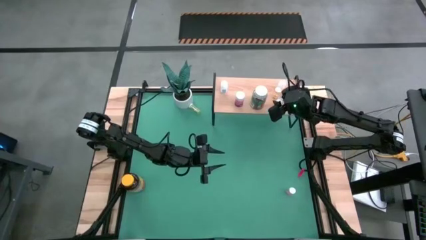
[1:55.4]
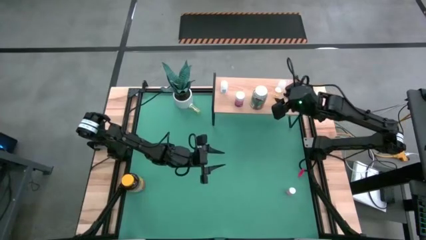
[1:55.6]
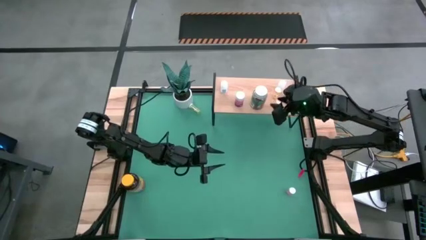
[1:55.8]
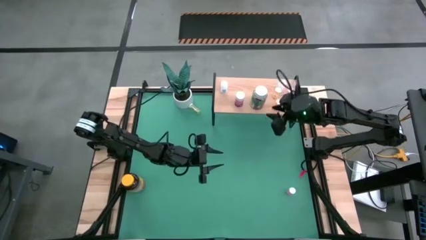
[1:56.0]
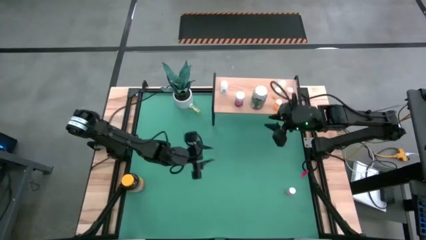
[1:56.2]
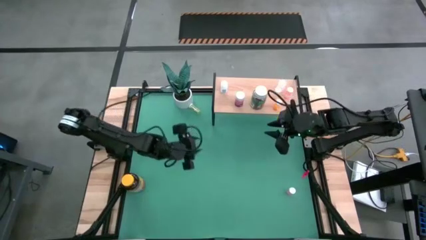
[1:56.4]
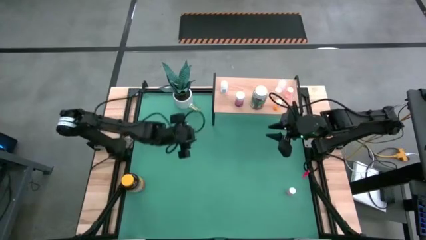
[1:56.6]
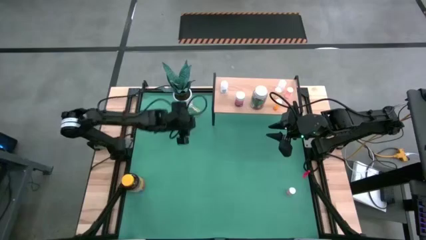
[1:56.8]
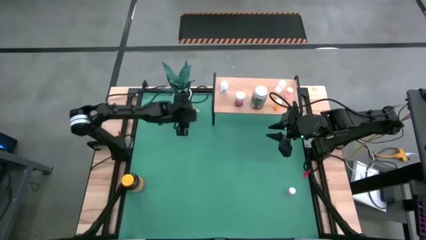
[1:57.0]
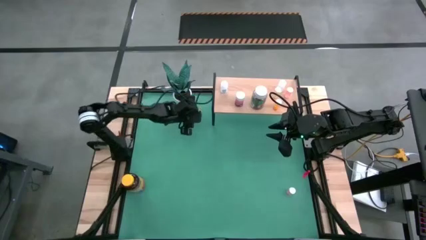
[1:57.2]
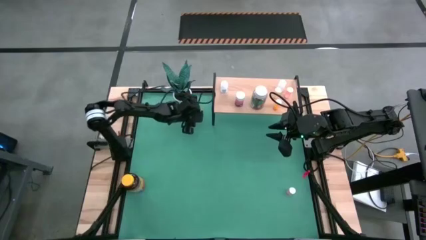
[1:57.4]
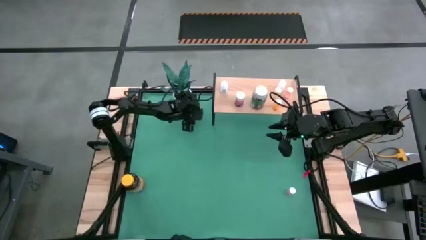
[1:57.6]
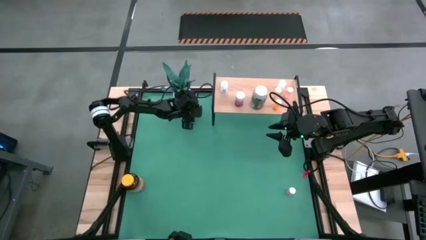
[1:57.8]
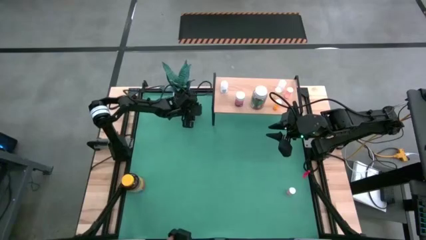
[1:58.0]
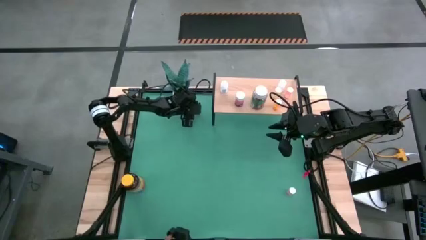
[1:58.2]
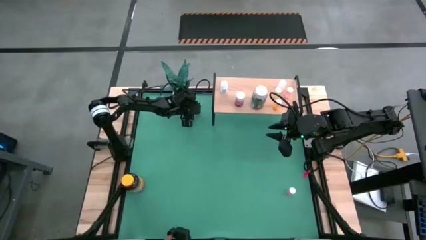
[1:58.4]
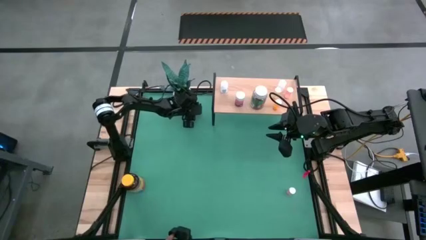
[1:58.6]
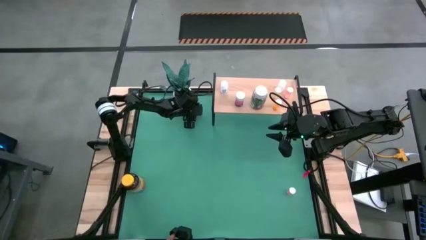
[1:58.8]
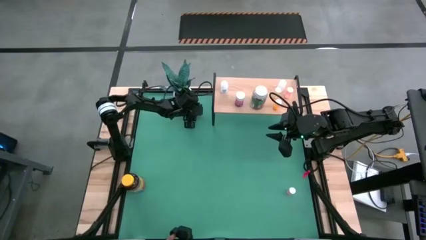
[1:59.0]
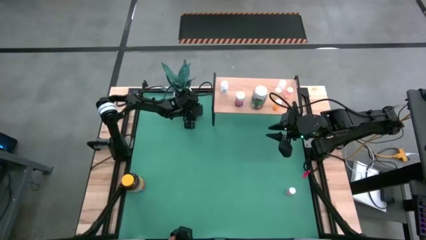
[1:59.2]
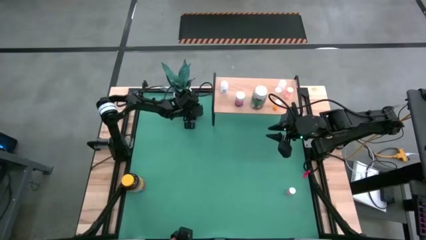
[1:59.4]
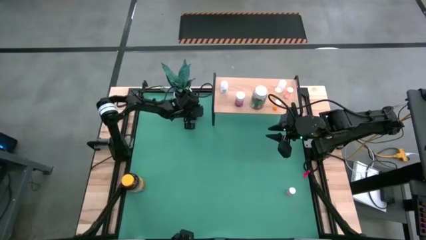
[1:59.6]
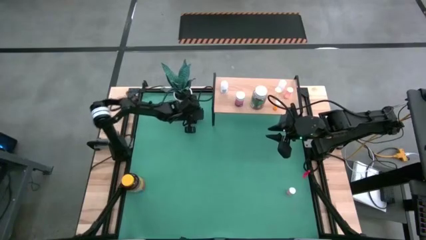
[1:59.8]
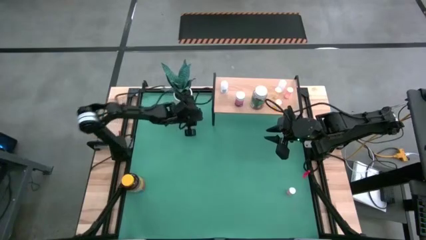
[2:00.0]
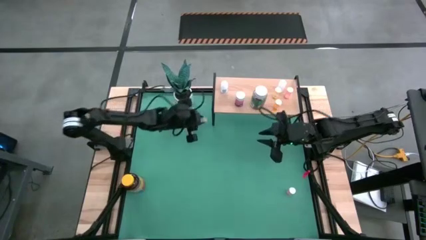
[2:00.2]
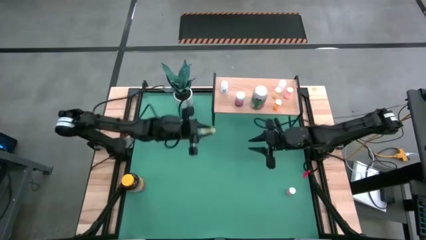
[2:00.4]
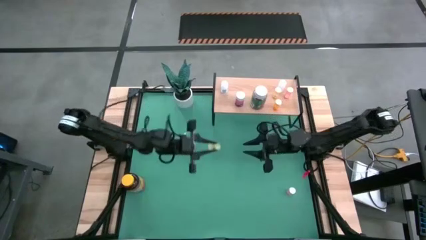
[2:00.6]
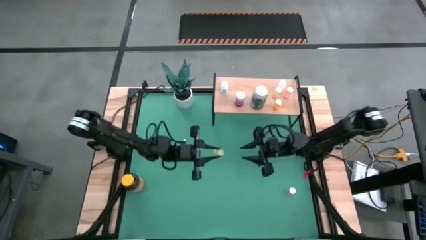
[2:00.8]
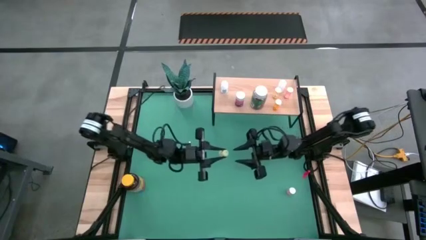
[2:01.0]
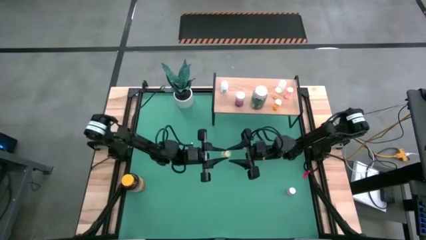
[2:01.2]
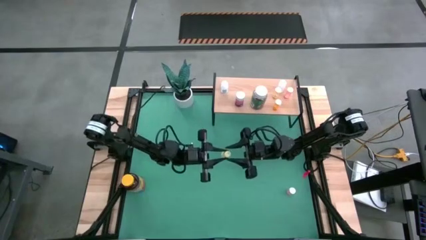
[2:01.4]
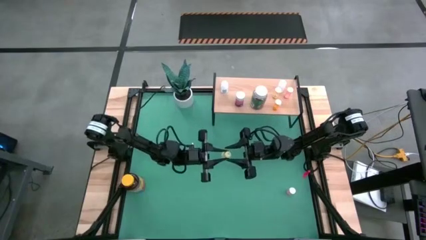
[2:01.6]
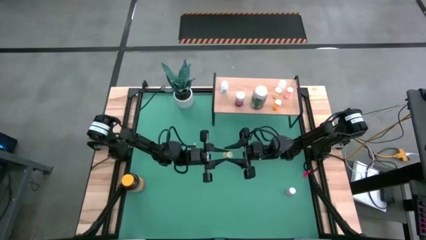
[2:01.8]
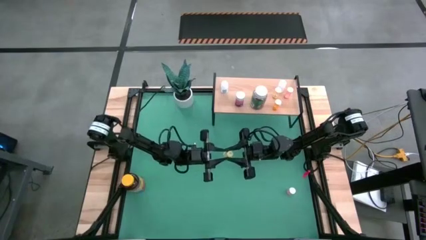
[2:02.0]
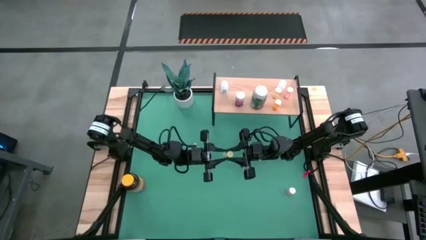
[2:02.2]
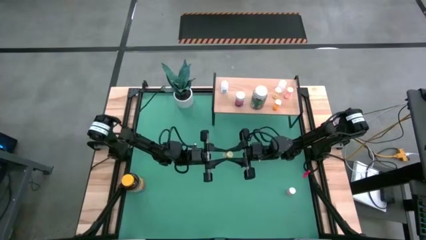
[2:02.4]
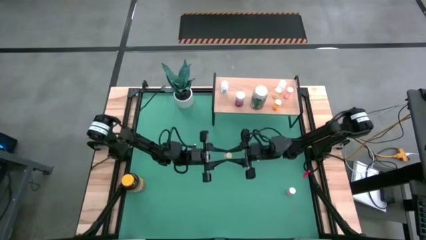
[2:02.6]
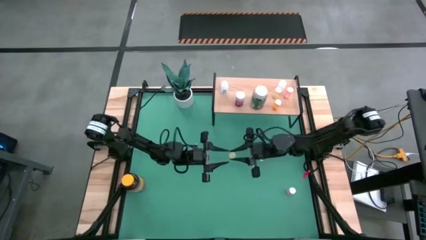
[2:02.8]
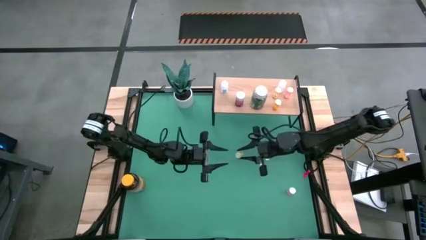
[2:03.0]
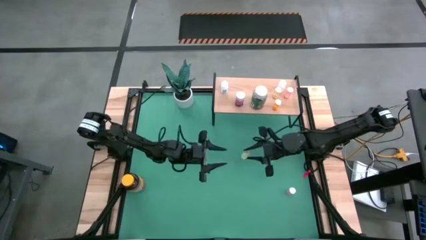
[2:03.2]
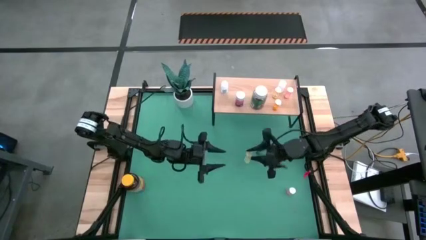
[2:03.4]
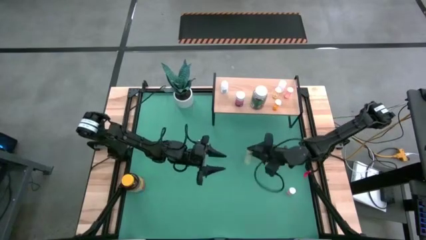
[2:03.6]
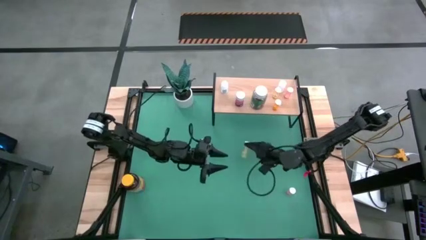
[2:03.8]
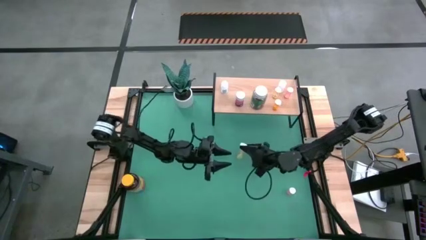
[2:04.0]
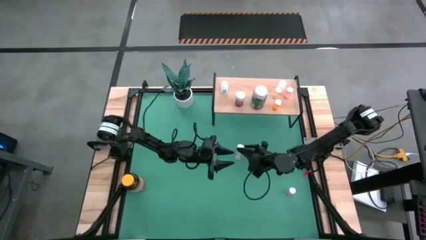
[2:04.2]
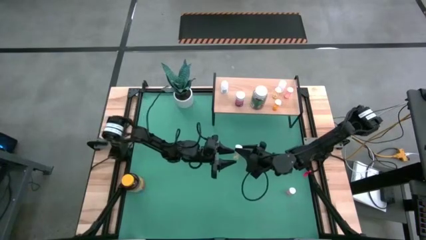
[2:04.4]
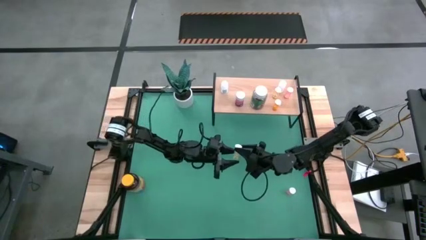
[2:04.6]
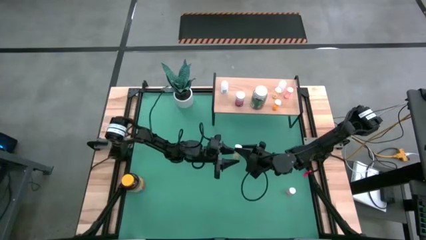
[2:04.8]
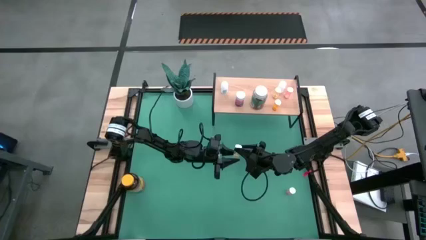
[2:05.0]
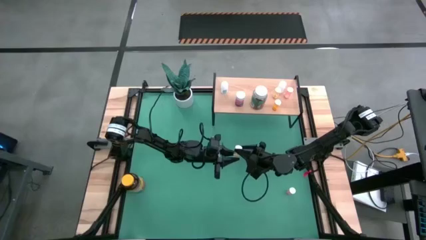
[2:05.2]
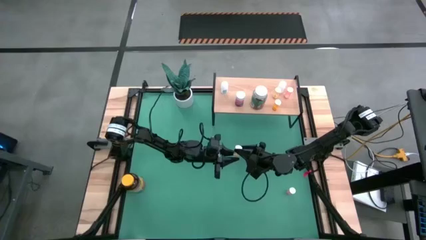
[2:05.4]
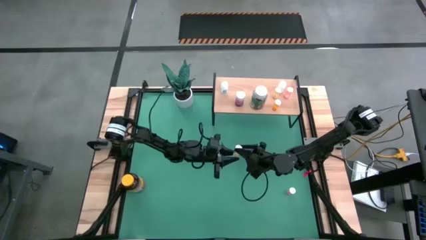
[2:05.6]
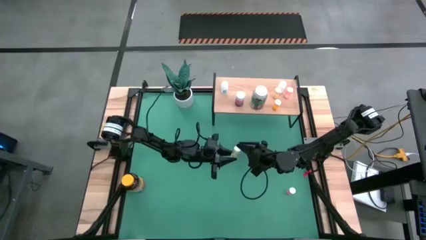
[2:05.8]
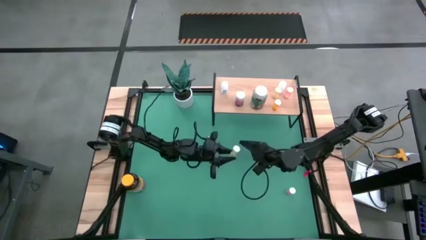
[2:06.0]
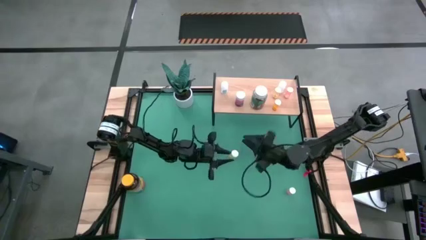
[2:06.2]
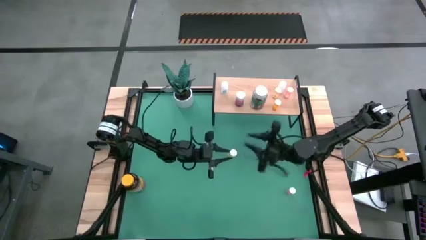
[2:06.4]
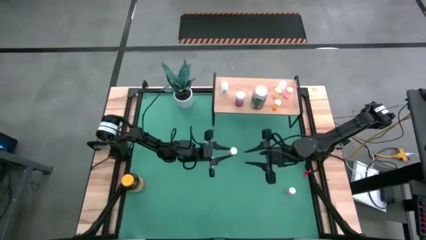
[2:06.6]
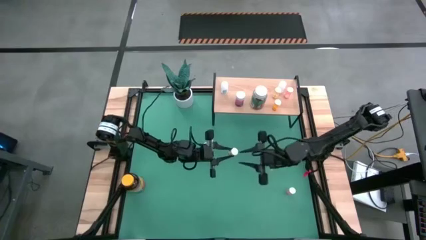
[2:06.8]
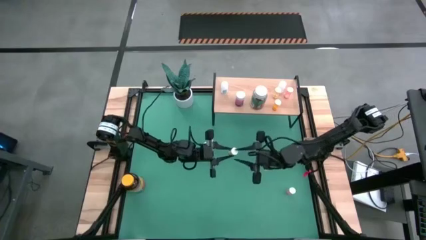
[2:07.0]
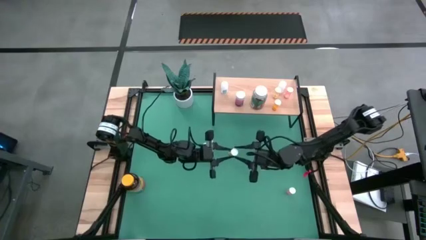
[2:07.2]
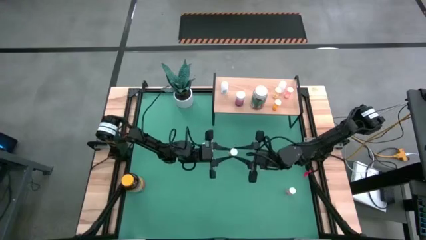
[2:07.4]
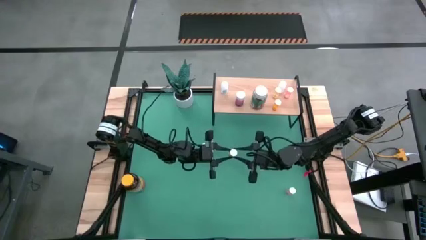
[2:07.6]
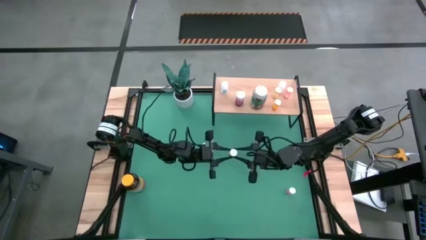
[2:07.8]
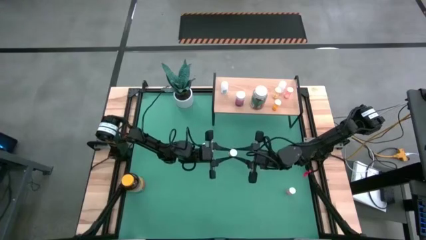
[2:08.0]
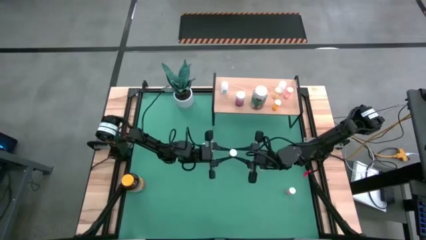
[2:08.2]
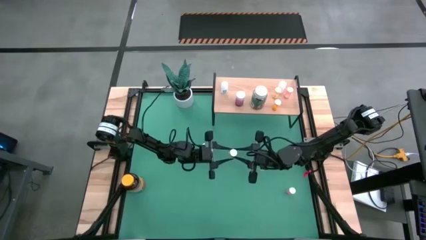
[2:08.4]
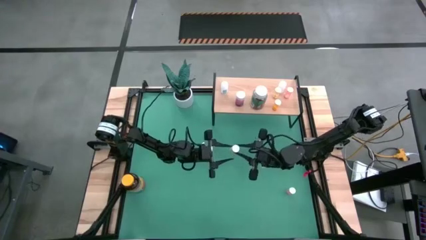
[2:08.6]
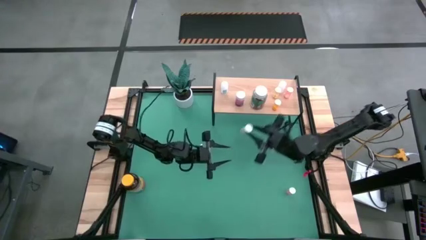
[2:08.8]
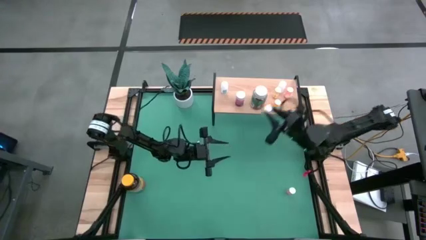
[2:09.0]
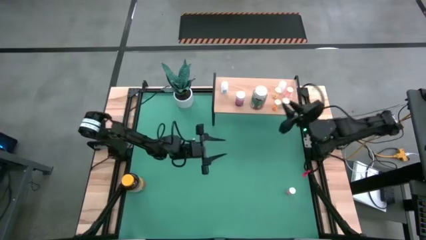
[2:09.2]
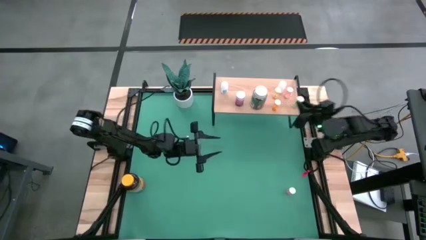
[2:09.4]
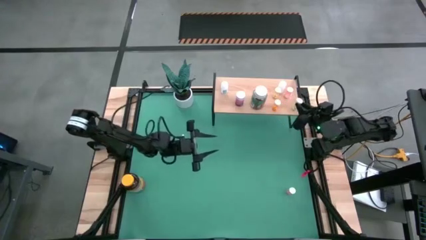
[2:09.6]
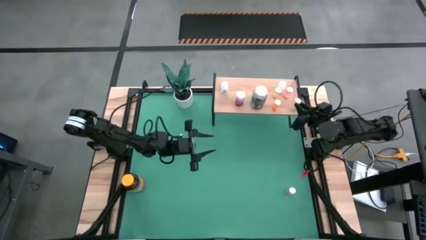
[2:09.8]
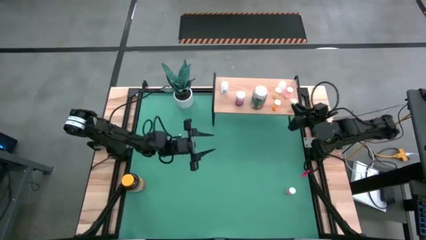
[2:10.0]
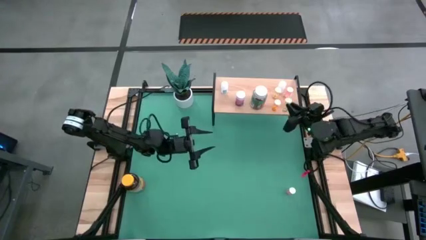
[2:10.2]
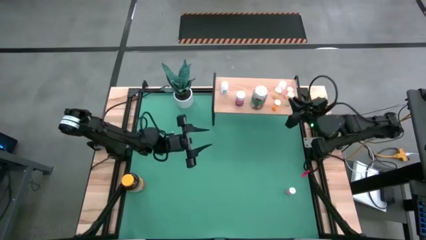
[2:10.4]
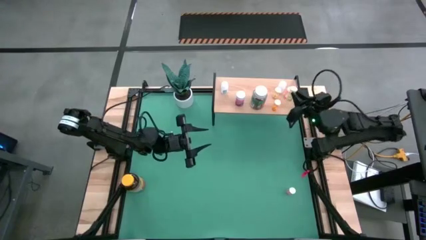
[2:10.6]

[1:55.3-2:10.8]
Task: Pick and place medicine bottles onto shelf by color
Put the light yellow pill bottle on the shelf
